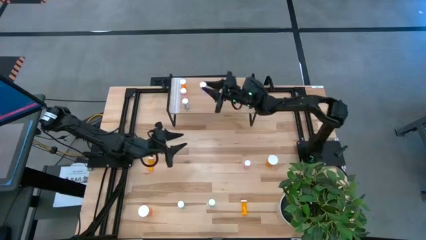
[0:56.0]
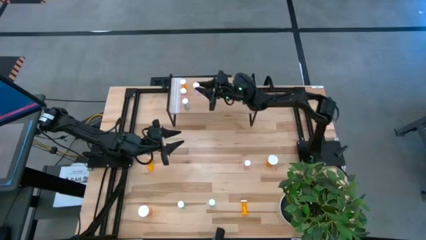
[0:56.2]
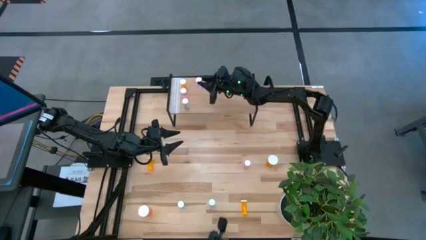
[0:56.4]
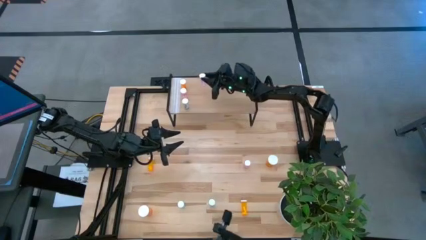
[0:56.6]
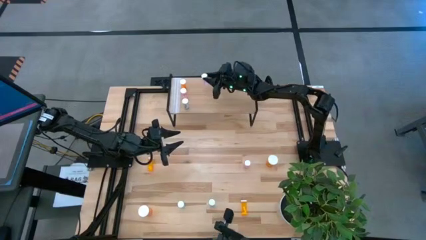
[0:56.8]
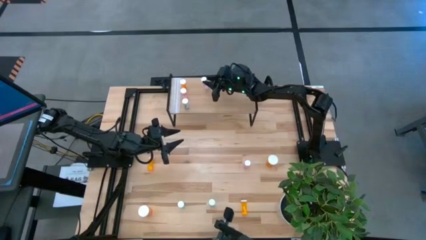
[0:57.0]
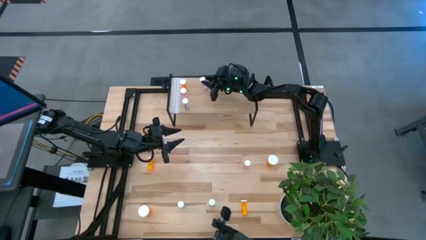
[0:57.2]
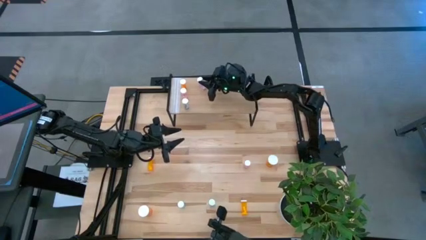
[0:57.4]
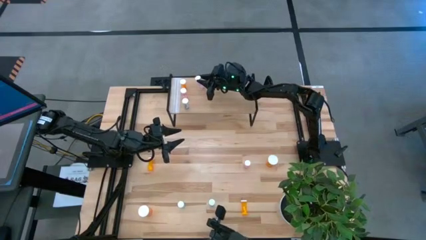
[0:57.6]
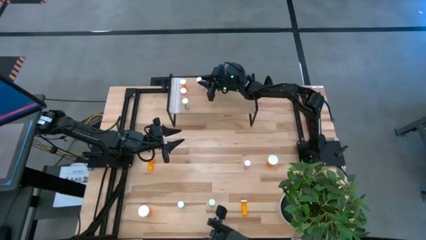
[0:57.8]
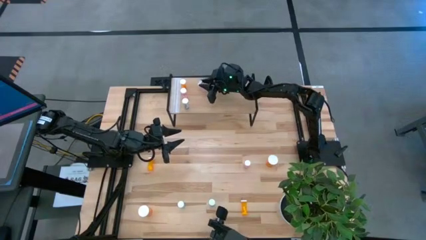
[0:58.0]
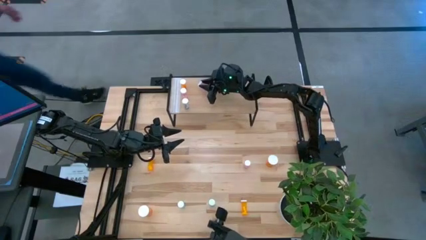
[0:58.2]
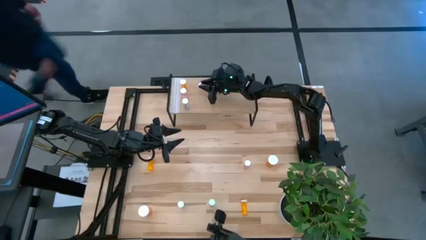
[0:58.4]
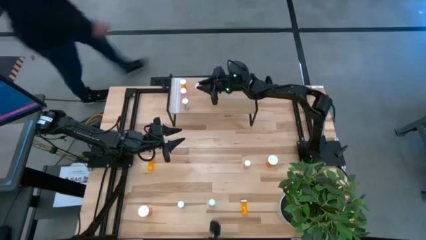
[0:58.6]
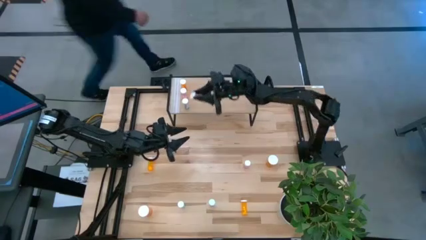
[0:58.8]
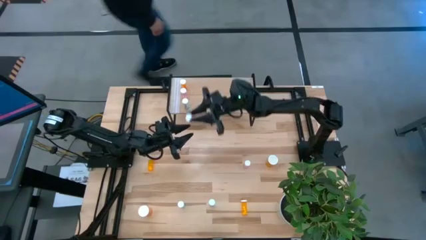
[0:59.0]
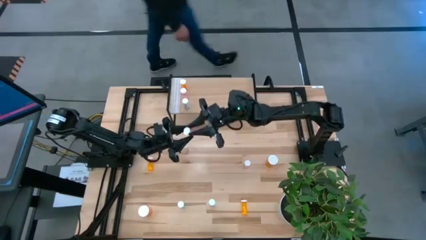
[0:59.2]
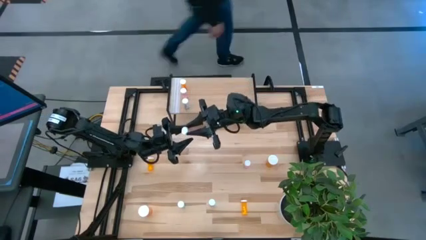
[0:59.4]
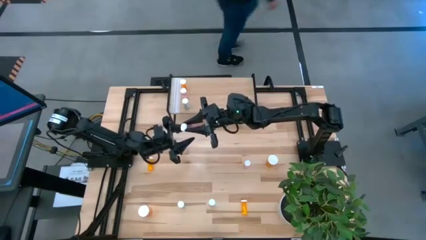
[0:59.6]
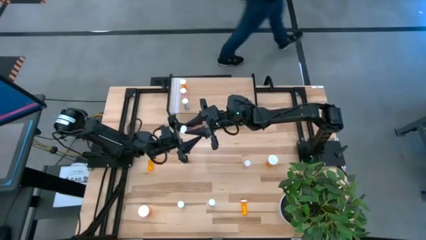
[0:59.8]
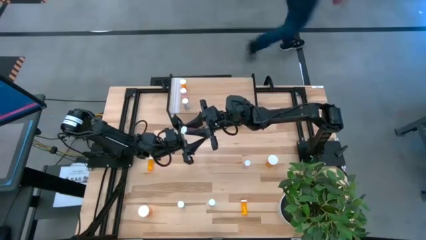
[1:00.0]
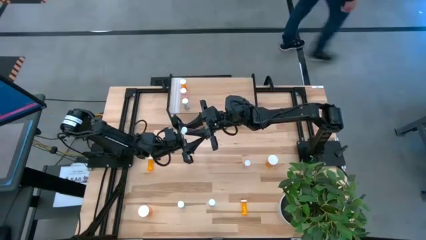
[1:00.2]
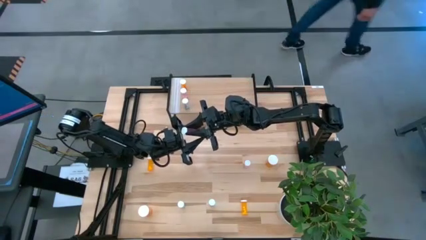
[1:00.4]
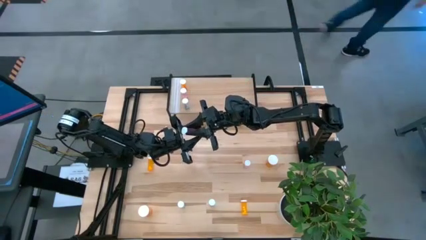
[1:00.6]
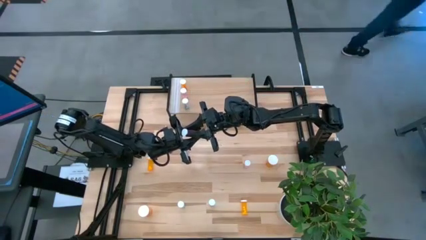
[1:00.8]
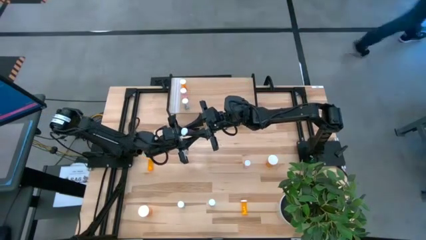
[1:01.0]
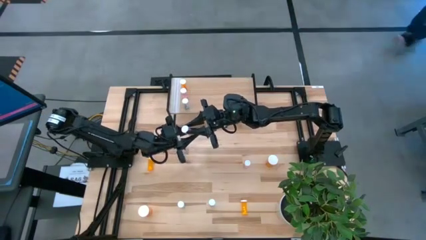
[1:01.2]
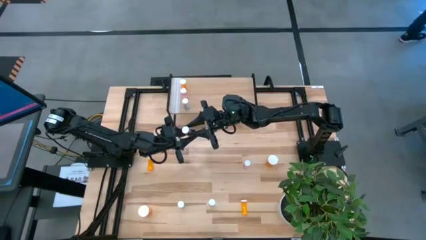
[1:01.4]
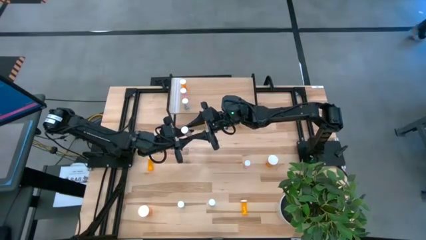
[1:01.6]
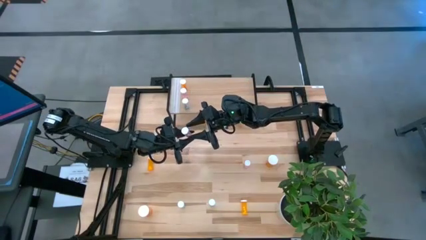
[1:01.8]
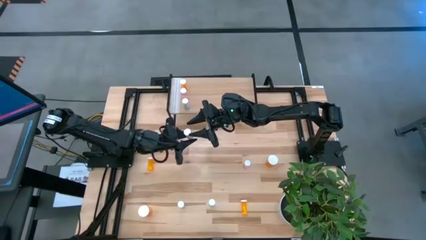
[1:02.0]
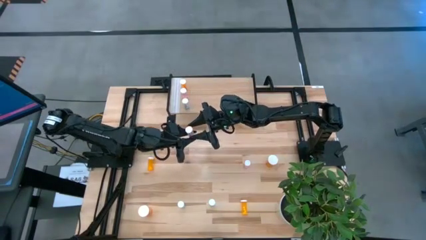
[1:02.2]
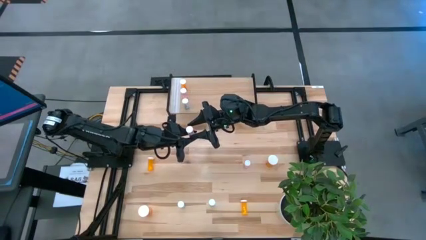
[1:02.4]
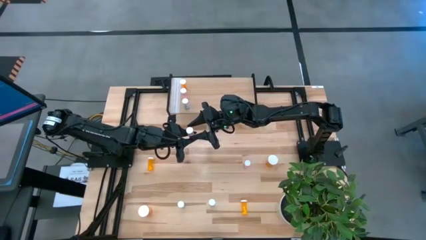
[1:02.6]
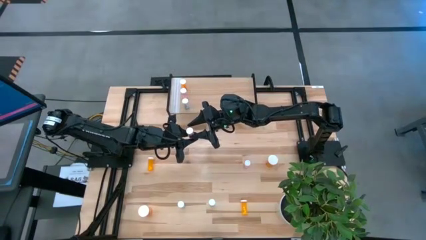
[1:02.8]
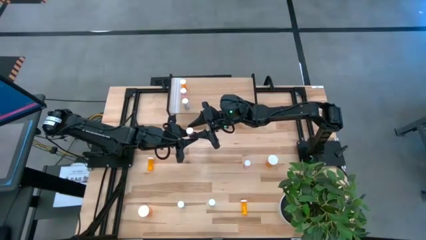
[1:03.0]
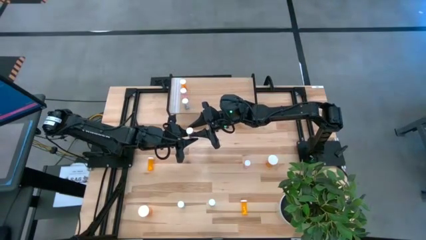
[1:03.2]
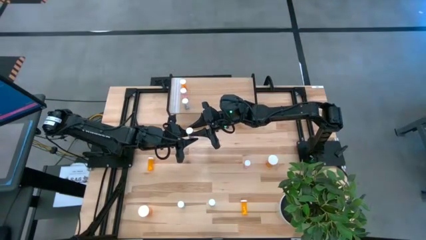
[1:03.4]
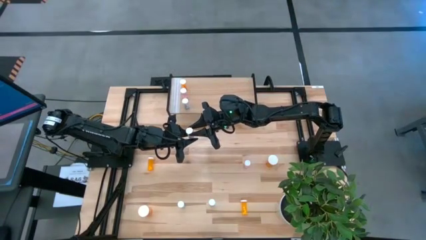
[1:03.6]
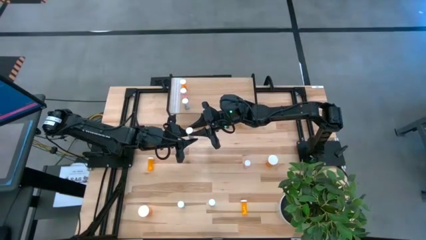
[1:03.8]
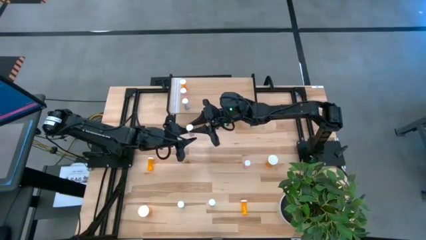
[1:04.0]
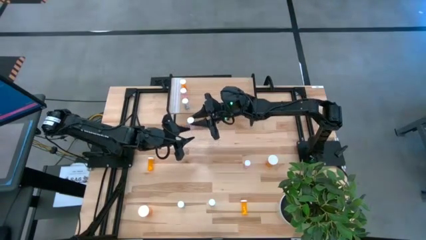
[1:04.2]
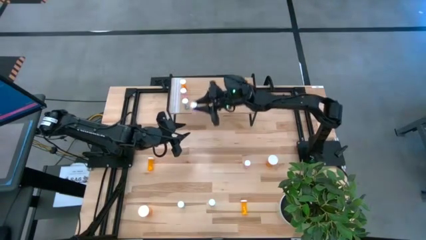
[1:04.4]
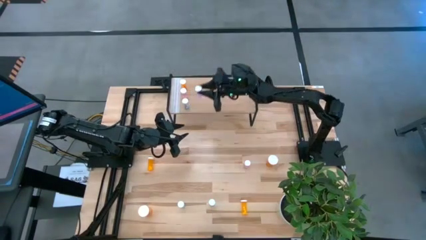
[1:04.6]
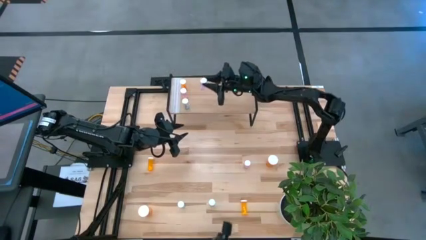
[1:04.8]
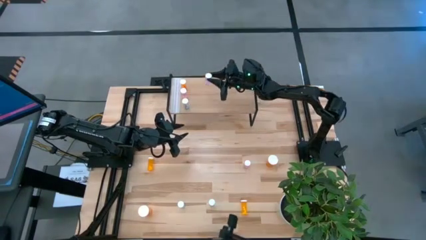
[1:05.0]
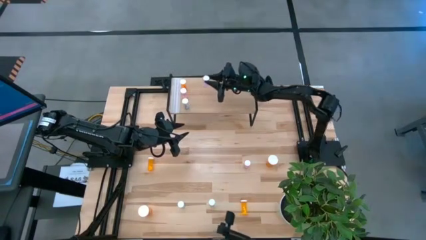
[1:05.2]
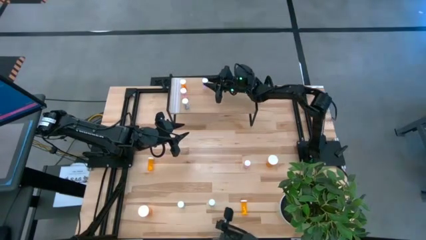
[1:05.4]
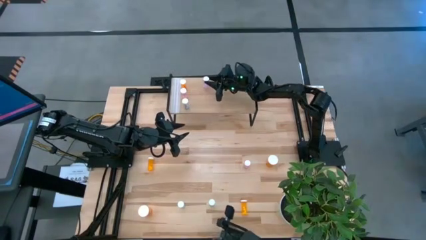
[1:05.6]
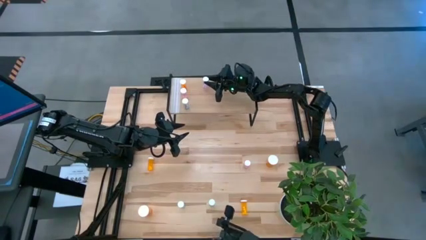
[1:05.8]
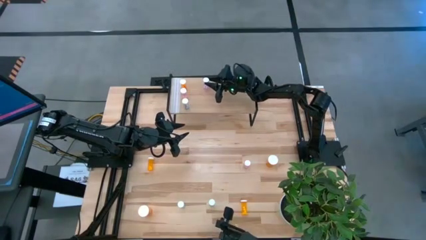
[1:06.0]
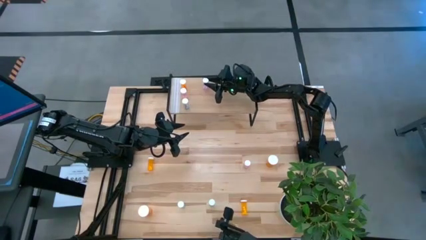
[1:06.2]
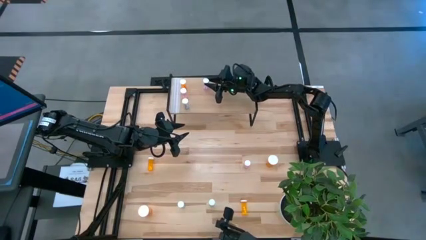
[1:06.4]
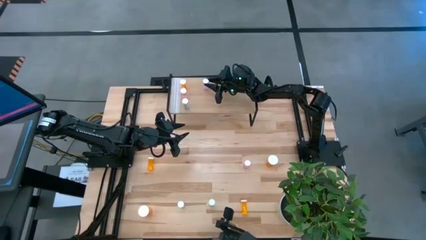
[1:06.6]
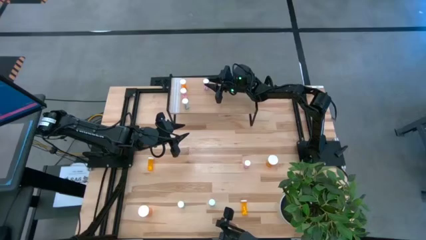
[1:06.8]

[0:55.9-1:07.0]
Task: Pick and place medicine bottles onto shelf by color
Put the left pink pill bottle on the shelf
